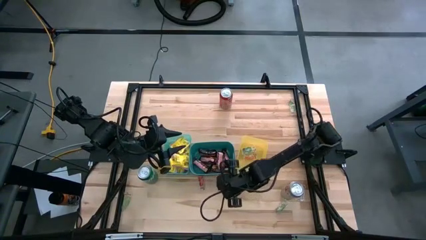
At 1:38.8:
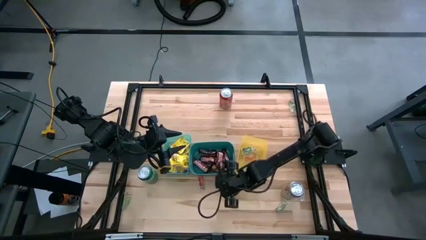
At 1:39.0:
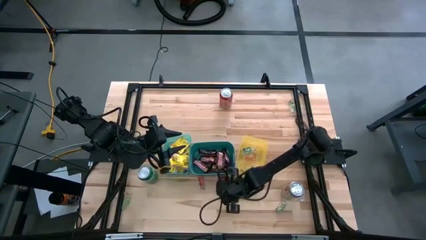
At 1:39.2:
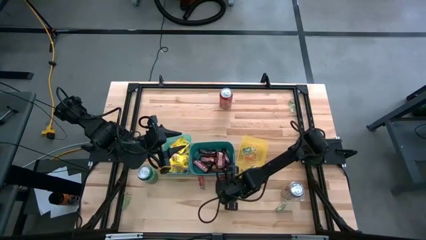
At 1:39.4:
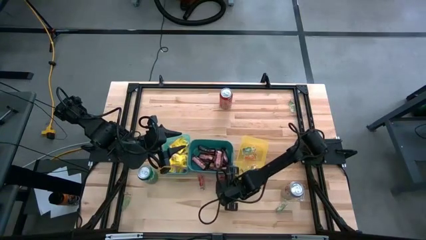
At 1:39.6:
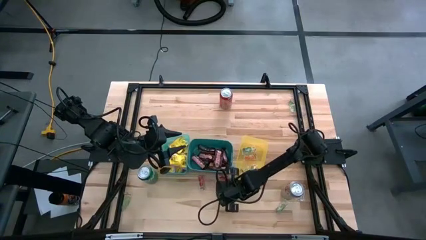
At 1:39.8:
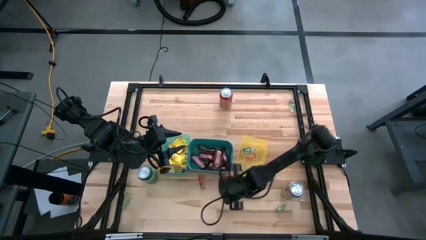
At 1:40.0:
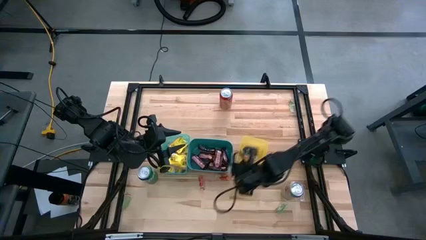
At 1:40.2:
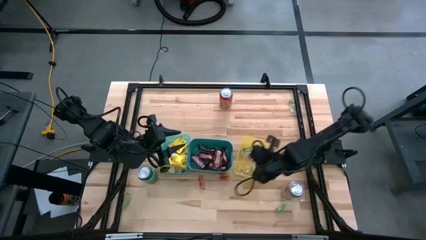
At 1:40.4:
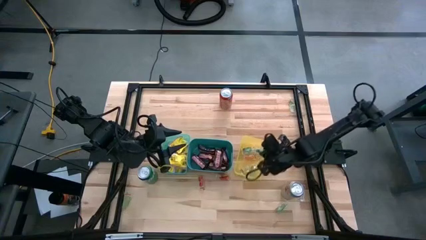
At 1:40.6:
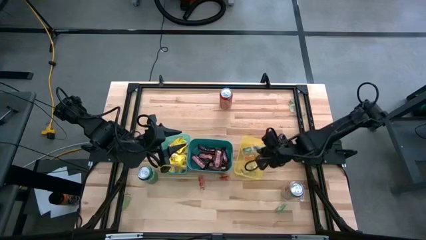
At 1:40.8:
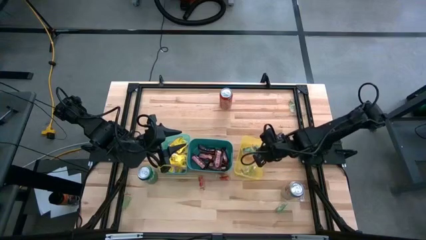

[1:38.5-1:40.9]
Task: Sort candy
Put the blue gummy into the yellow bin

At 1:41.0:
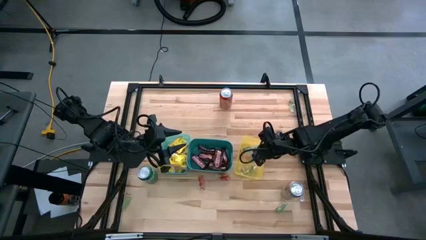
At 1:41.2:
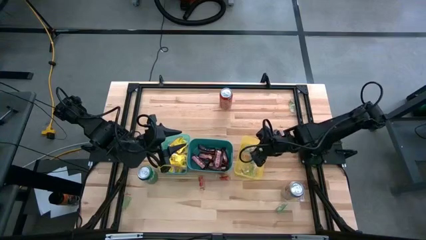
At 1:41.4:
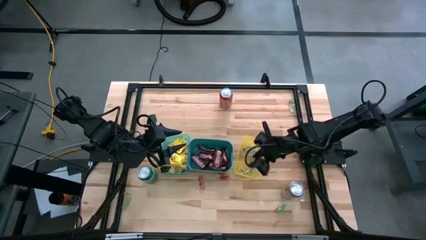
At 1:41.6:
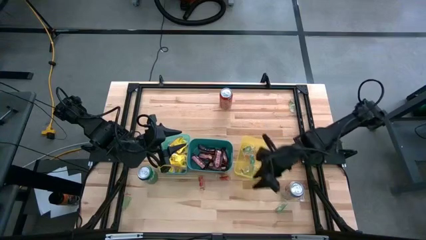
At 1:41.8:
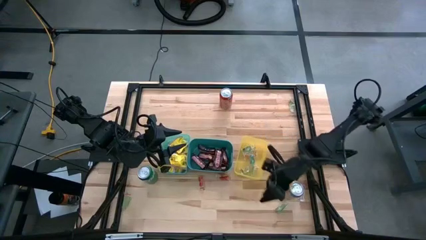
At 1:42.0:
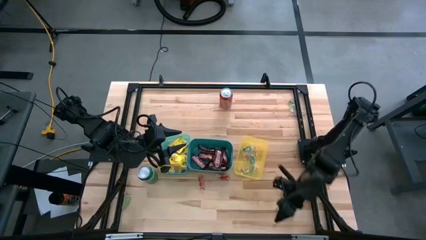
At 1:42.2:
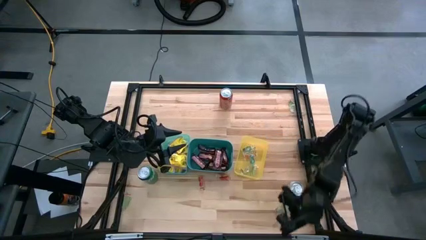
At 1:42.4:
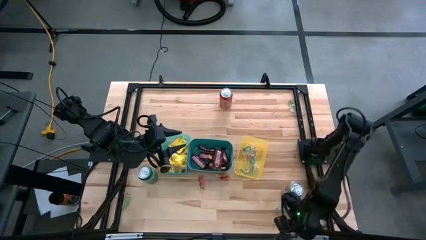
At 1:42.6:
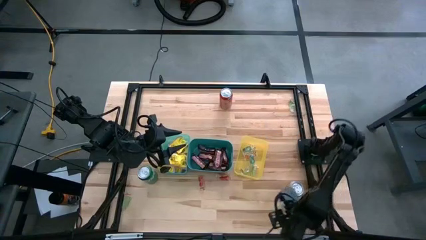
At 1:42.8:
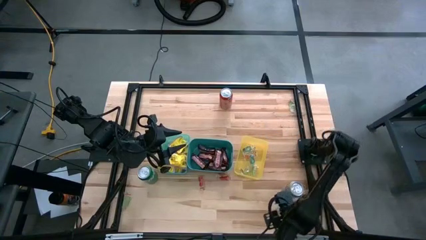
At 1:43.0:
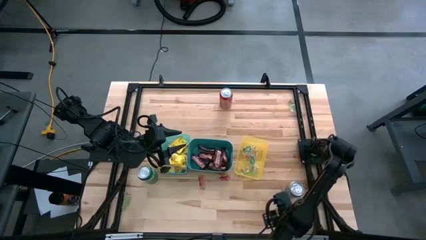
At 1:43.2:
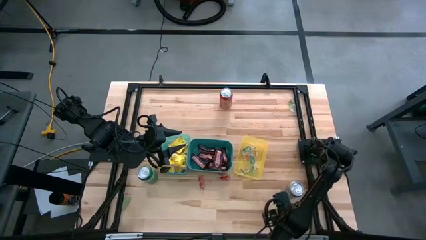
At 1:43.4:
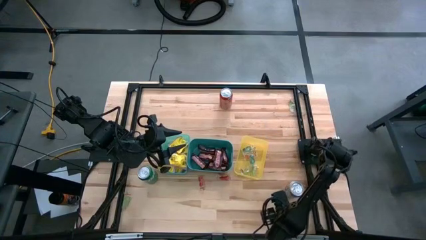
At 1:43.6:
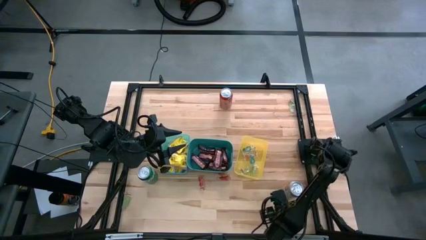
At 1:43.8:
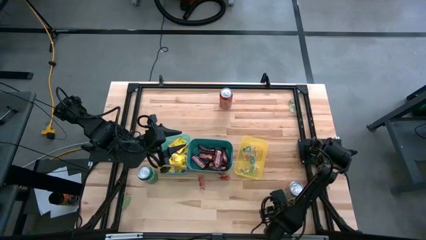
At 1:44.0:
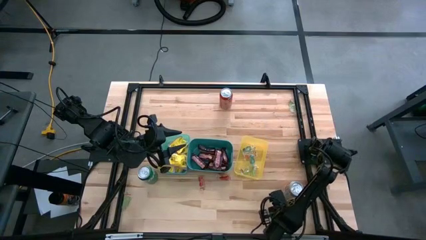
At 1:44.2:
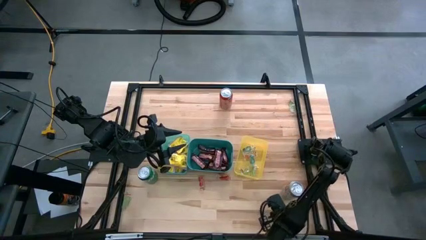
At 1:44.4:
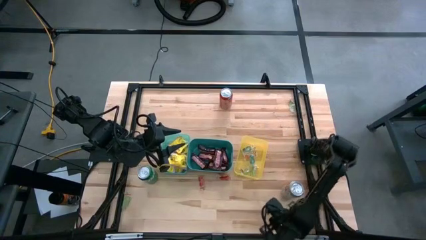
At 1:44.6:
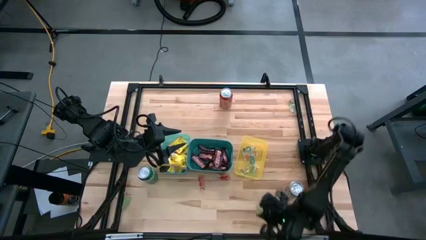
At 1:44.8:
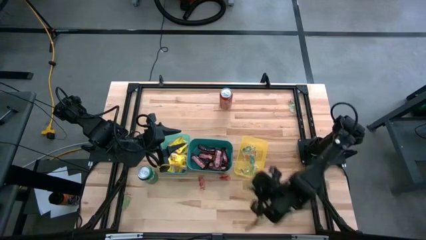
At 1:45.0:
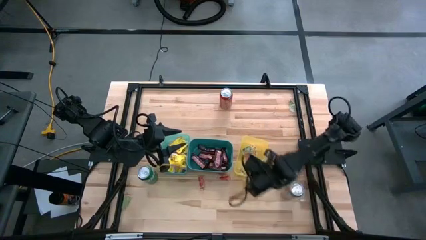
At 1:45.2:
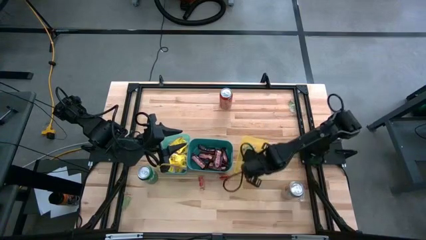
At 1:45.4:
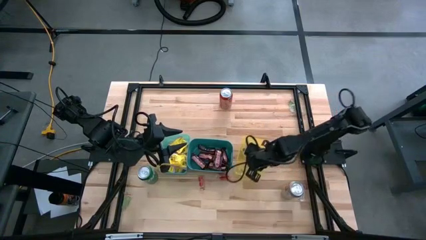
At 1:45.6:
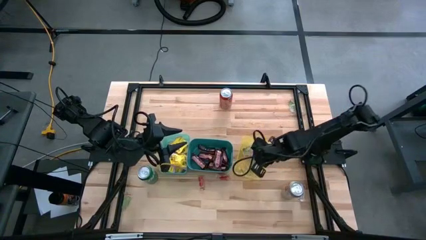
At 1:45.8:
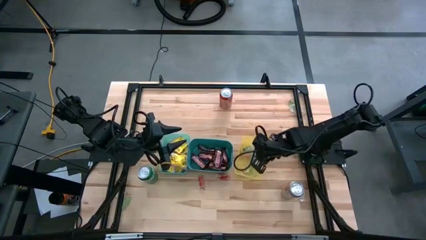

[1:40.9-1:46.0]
Put the green gummy into the yellow bin

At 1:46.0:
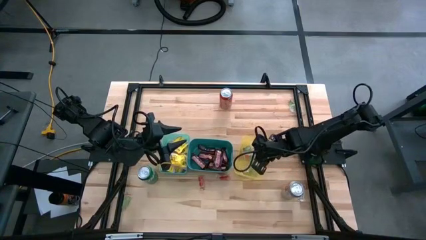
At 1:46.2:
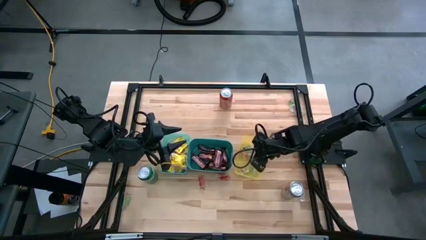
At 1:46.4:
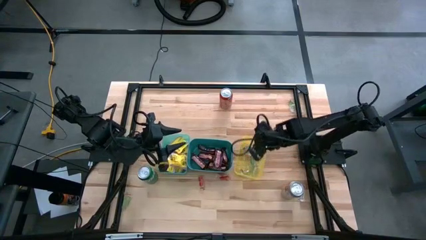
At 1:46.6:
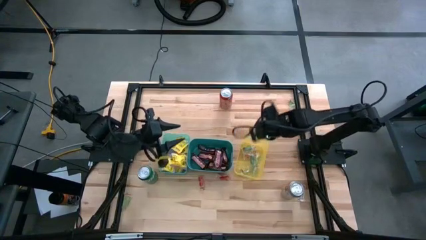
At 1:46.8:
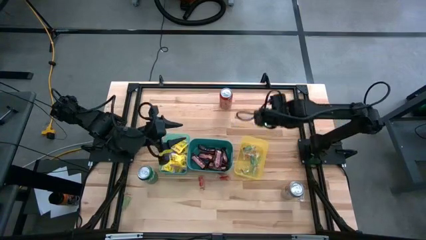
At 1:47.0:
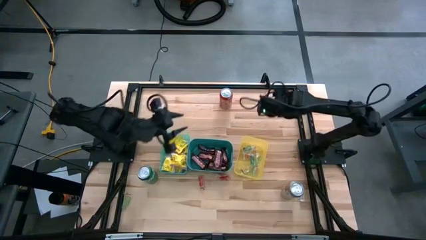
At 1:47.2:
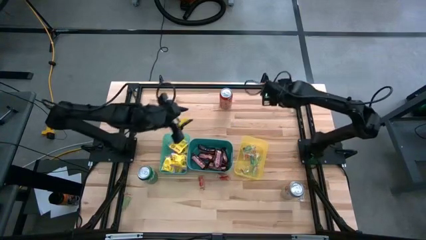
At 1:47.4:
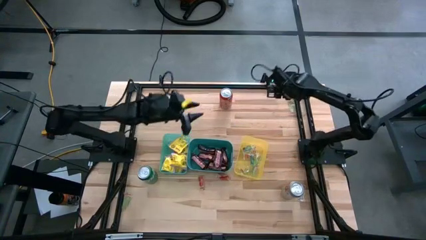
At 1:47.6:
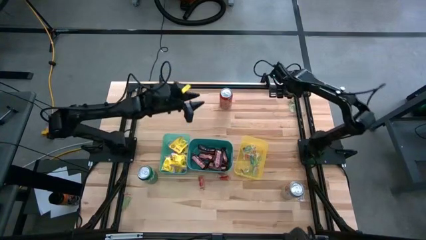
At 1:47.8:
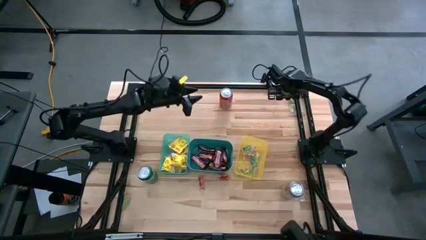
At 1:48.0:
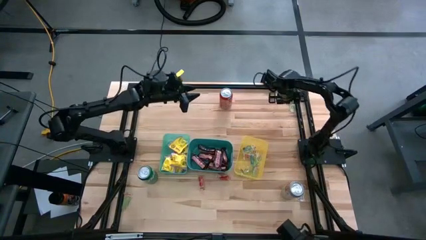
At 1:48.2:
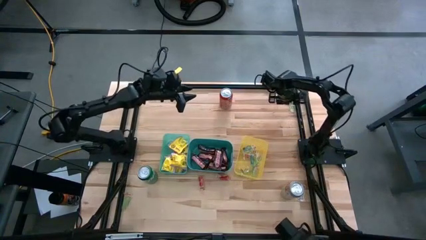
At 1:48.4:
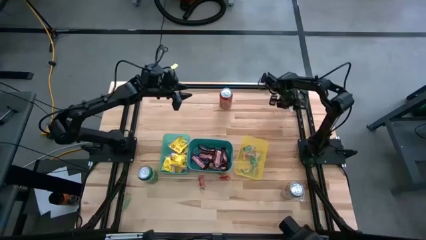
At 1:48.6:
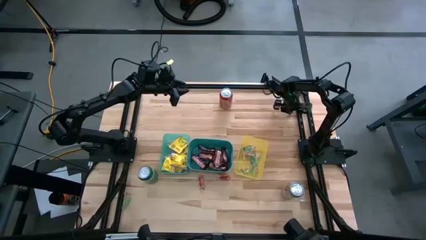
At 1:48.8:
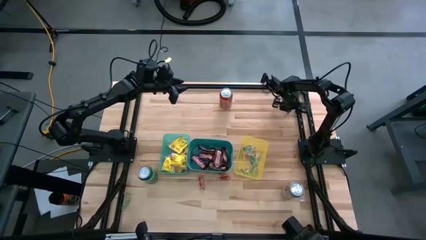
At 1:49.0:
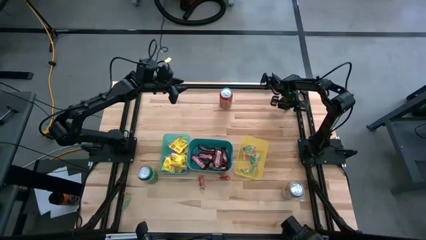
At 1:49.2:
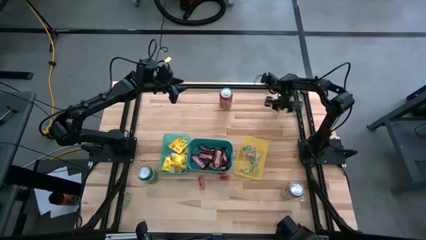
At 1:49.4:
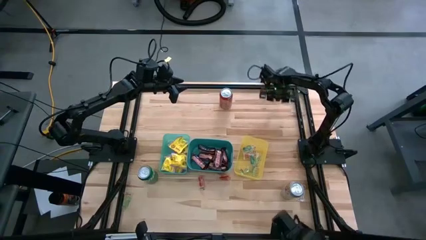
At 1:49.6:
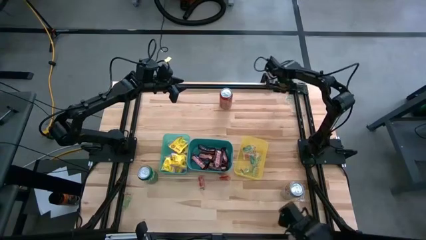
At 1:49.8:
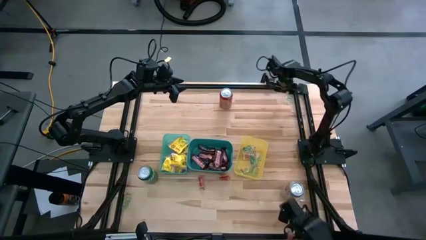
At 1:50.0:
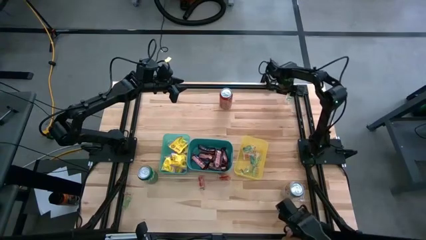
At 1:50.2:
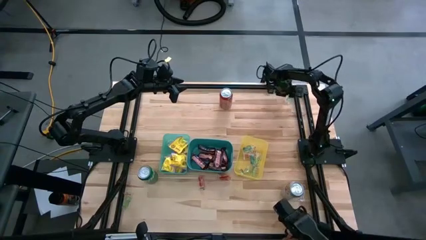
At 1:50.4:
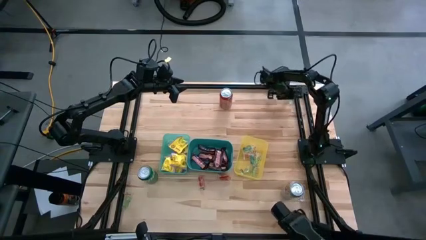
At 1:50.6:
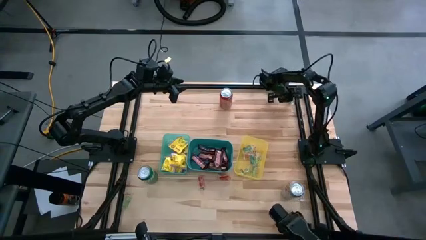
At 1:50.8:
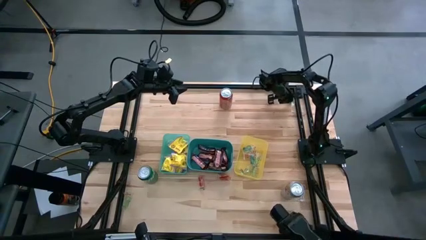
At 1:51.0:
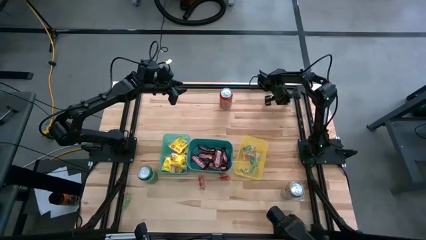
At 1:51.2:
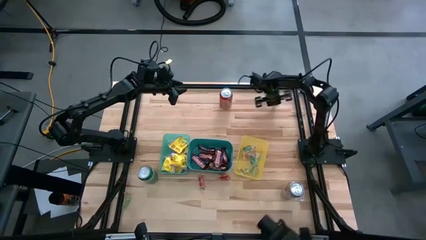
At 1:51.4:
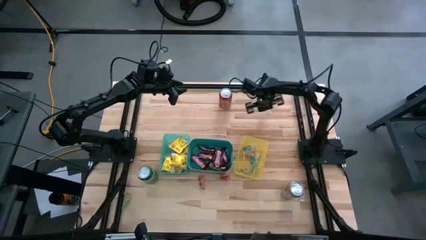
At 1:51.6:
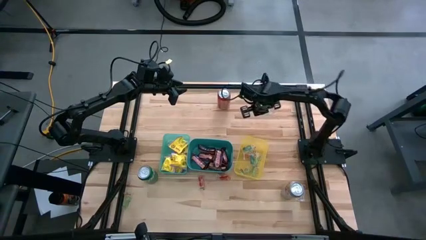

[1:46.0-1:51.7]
Put the green gummy into the yellow bin

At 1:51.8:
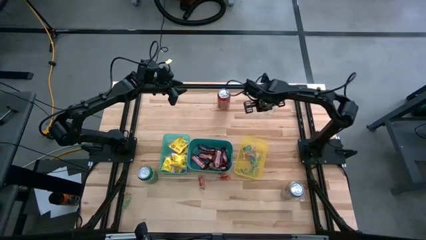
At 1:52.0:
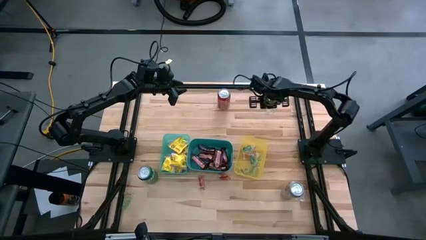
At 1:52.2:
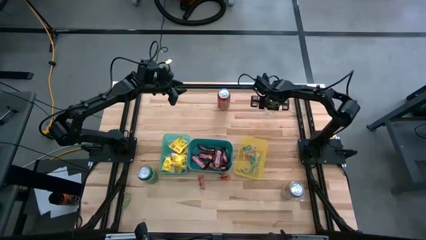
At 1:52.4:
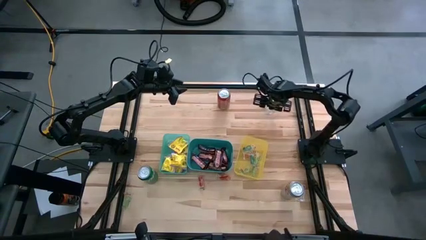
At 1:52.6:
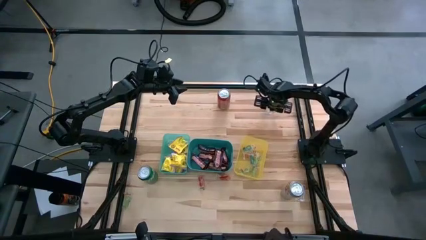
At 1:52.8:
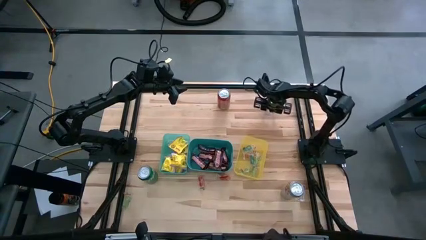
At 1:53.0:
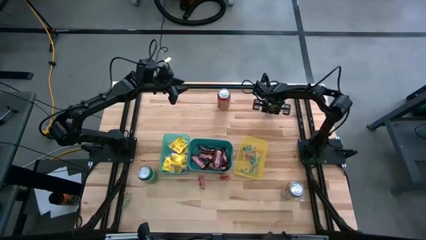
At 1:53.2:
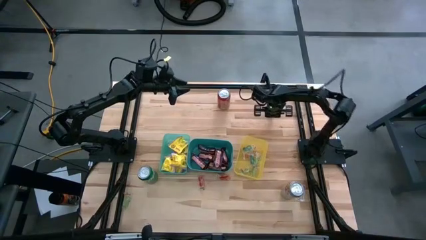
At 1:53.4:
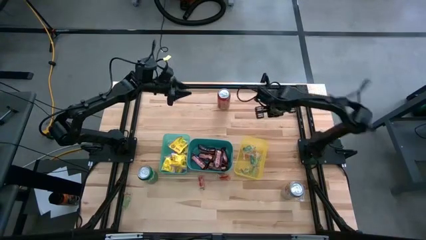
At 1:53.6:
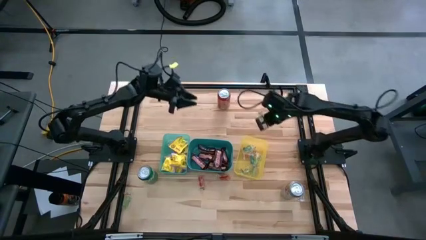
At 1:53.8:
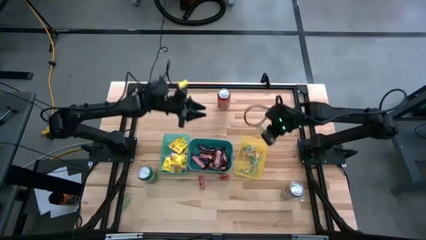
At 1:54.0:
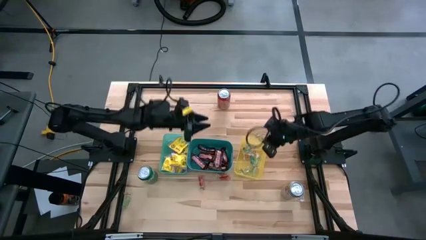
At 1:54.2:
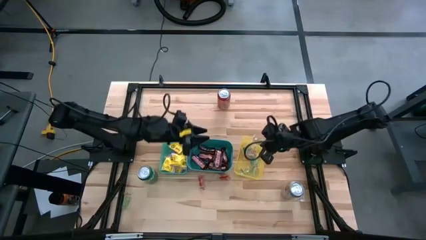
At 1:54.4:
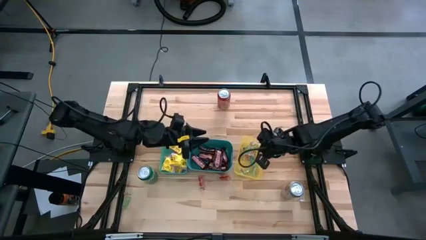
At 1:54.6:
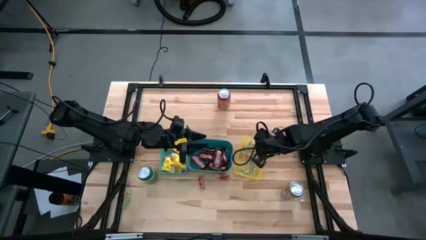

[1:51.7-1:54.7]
Put the green gummy into the yellow bin

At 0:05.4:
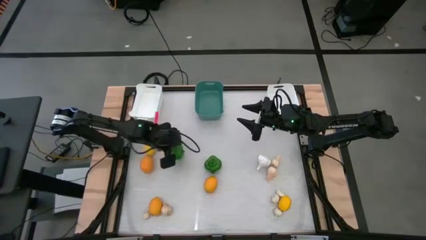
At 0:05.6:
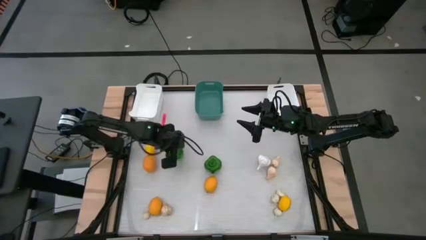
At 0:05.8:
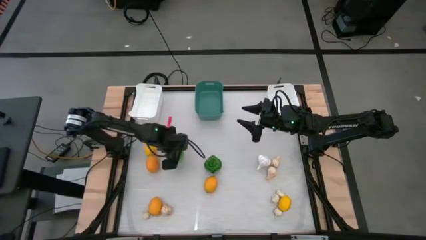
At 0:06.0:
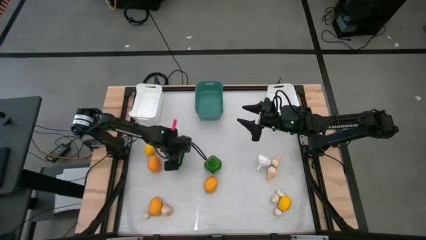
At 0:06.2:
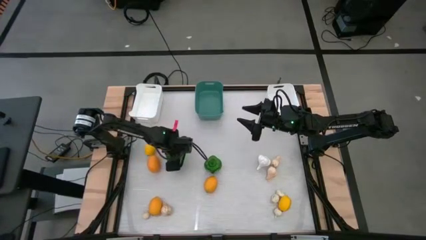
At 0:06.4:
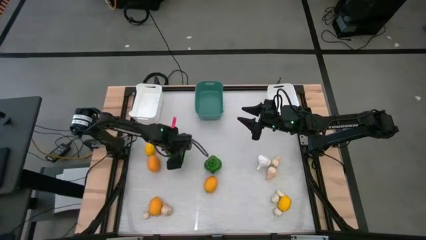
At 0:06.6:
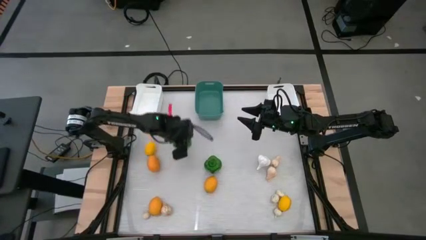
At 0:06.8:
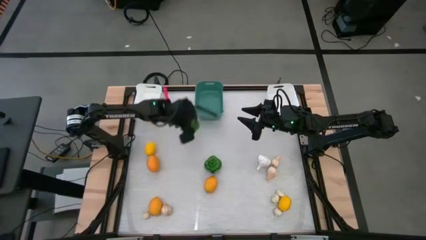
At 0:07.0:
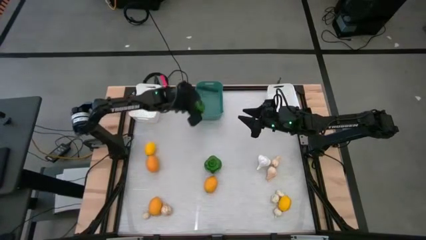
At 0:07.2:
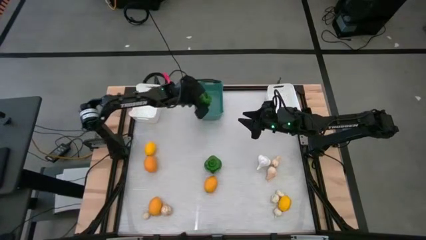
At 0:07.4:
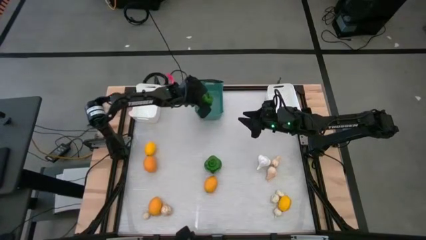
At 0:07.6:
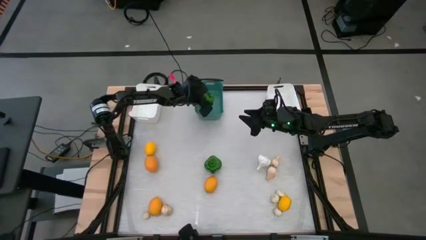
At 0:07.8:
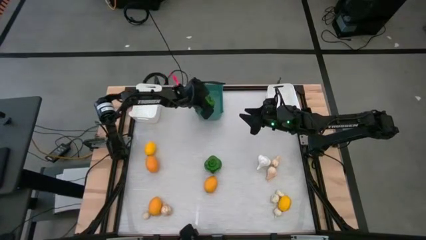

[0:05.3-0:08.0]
Task: Sort produce into baskets
Put the left green bell pepper into the blue-green bin
